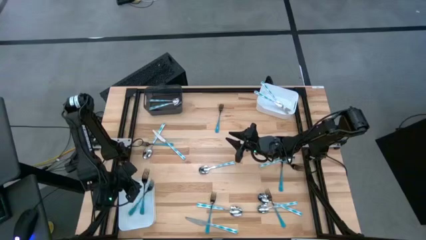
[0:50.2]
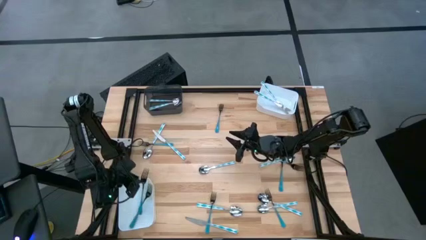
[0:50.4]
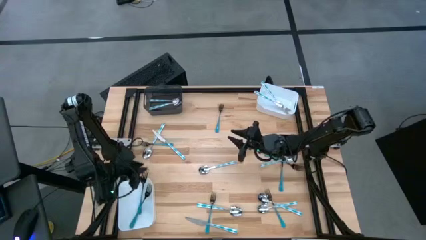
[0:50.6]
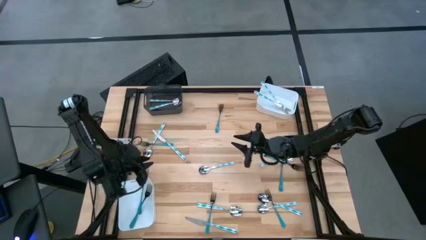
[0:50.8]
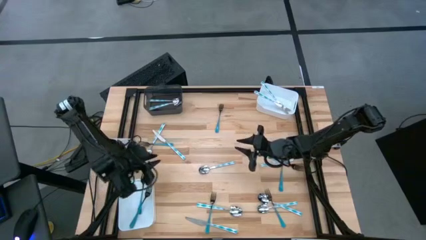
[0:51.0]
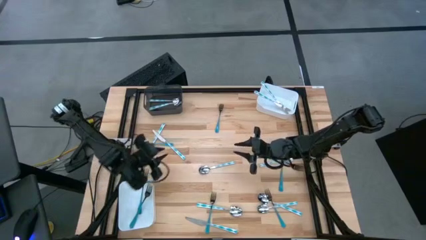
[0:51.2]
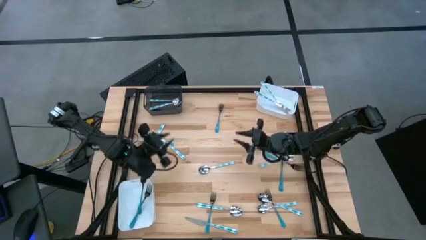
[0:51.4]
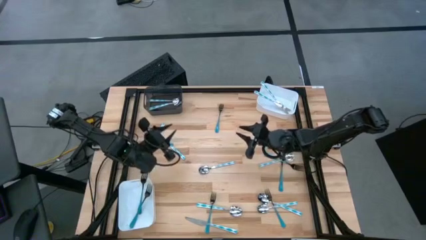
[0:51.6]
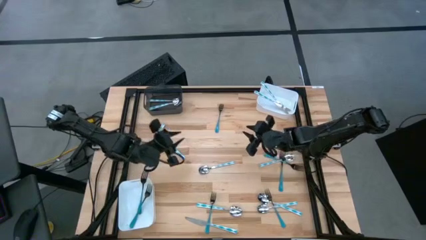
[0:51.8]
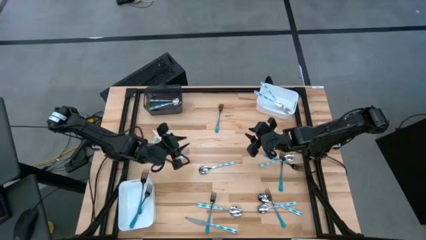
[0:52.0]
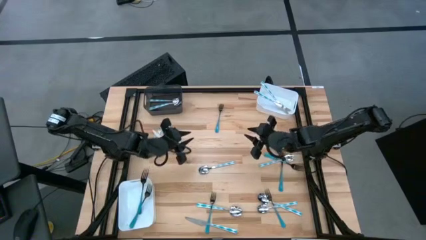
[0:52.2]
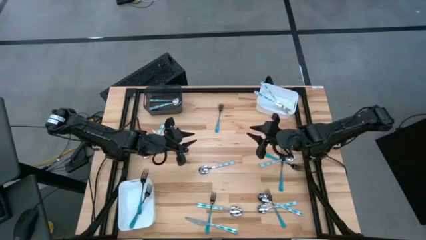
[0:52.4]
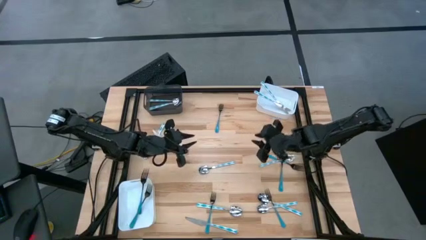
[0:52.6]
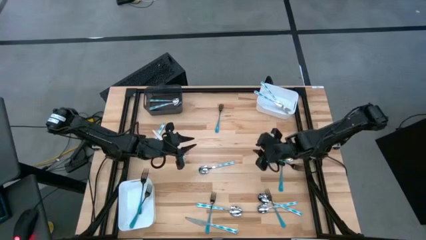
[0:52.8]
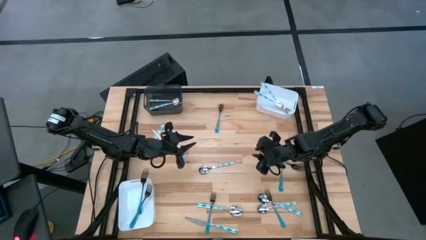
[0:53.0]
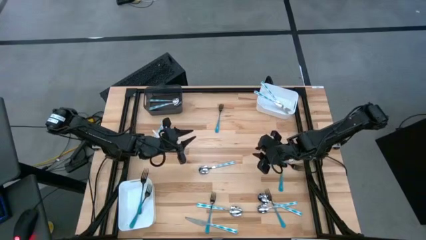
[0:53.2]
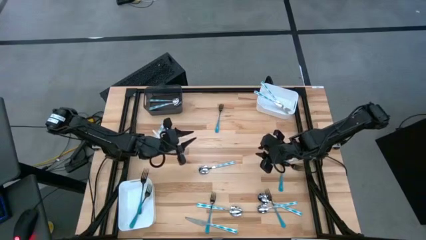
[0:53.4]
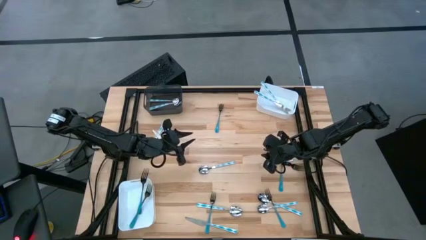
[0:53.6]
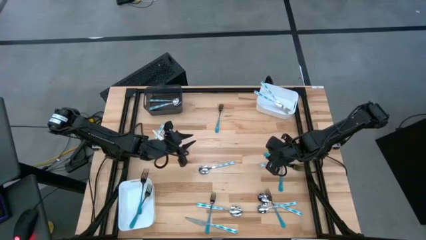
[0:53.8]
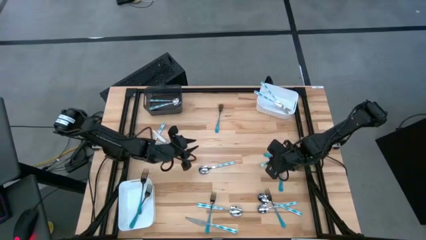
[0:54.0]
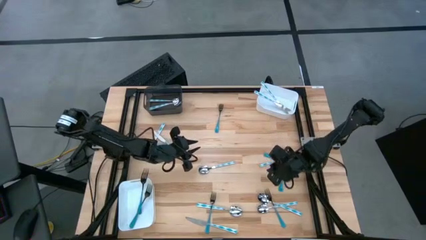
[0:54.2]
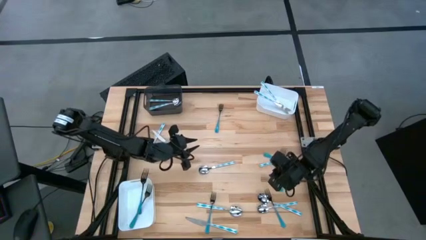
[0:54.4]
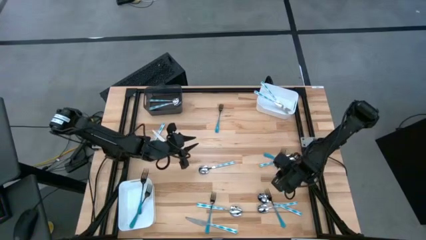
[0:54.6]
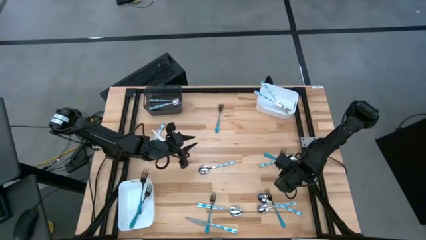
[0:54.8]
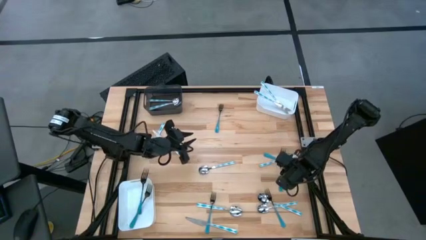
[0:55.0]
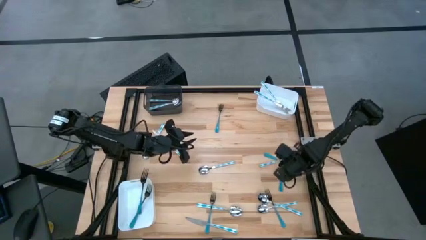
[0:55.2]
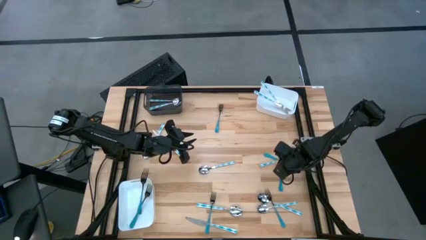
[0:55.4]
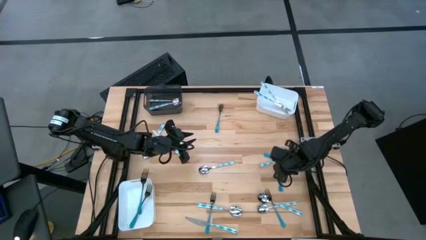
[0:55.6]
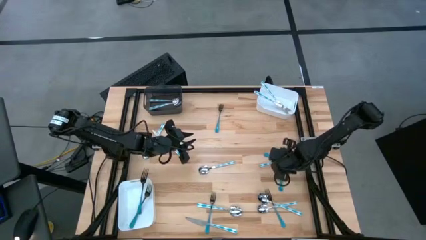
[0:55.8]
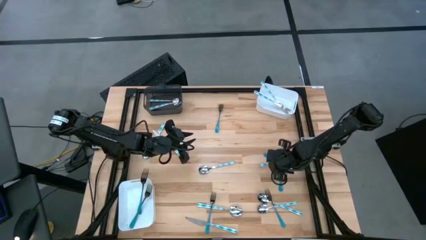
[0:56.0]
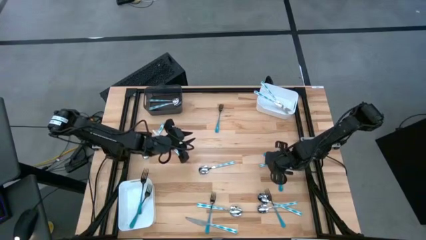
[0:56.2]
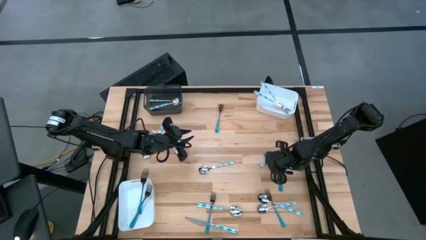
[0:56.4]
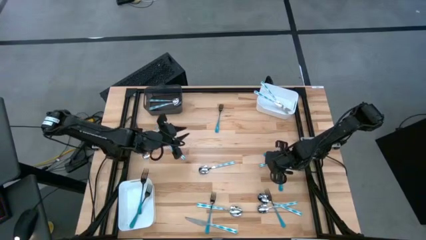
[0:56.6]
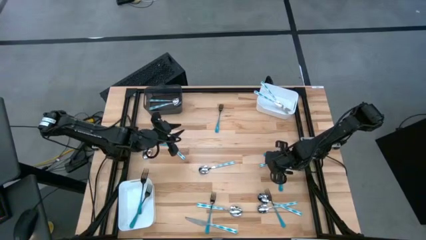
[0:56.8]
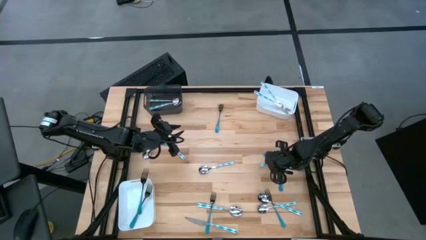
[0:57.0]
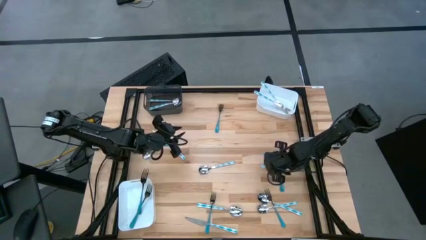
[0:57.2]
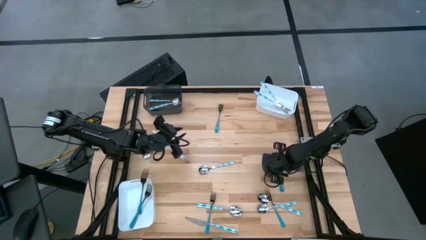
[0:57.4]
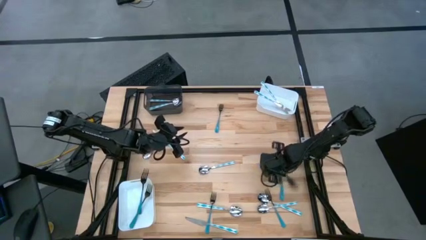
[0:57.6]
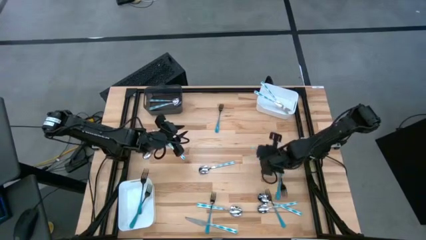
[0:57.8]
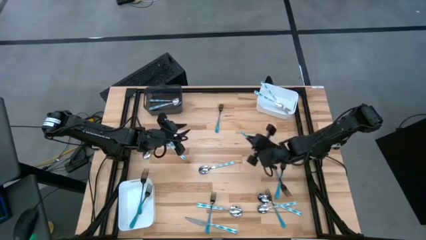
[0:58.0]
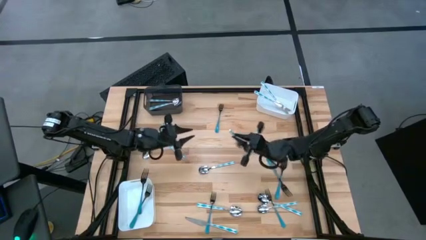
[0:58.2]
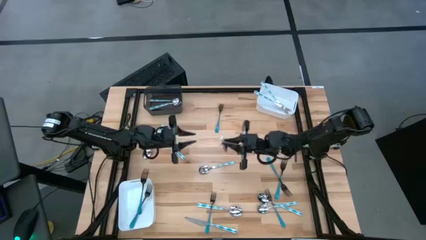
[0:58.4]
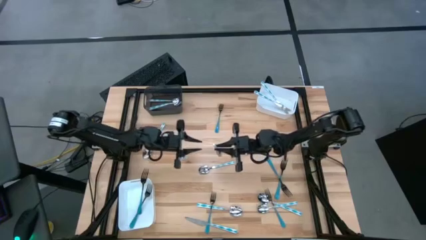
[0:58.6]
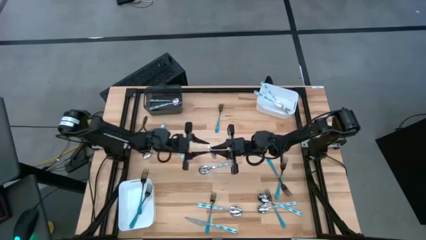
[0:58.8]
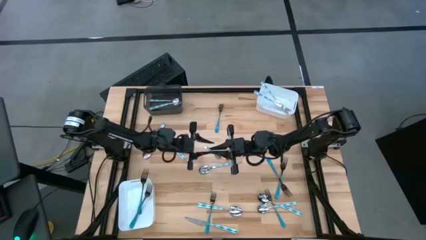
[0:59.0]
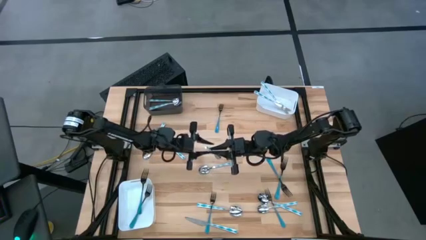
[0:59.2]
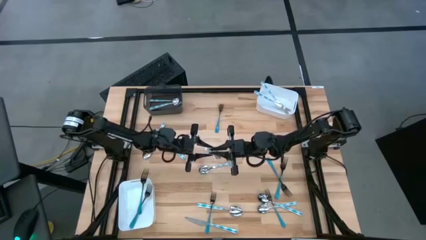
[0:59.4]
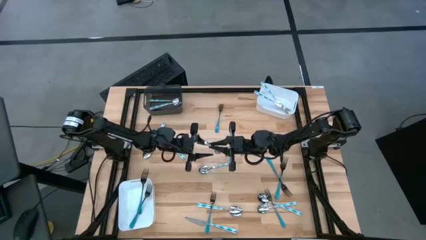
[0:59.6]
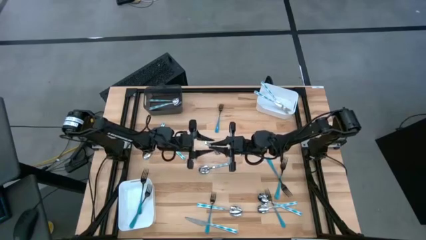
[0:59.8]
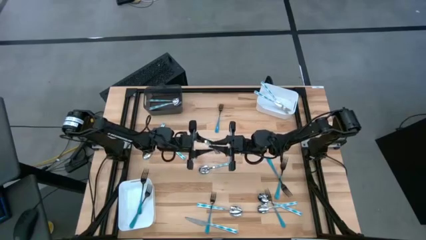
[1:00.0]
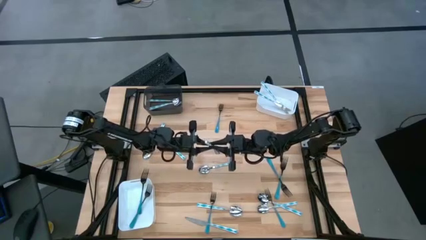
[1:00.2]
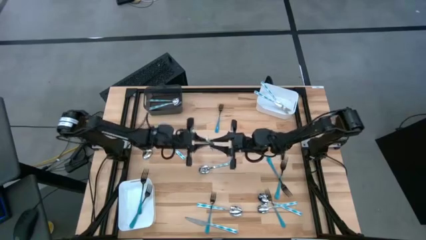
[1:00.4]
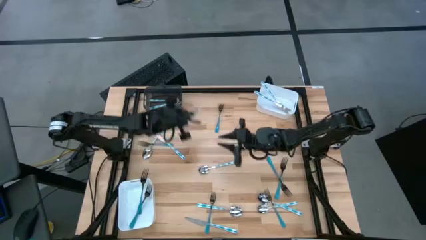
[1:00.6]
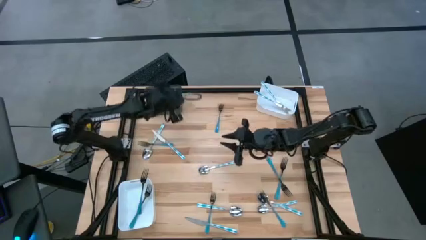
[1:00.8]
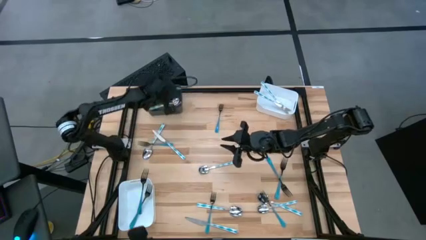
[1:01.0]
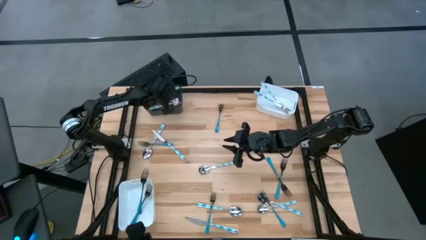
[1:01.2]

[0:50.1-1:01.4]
Task: Sort silverware by color (type)
Put the blue patterned spoon into the black bin

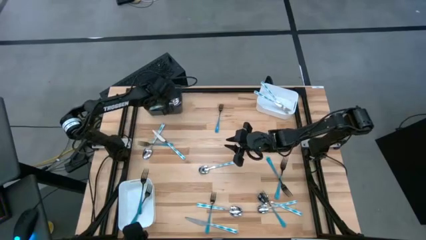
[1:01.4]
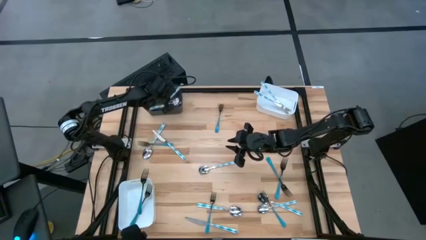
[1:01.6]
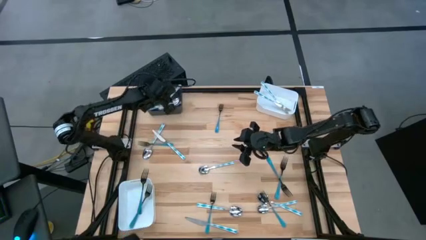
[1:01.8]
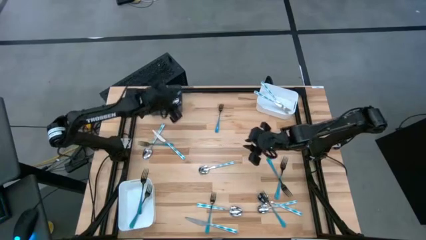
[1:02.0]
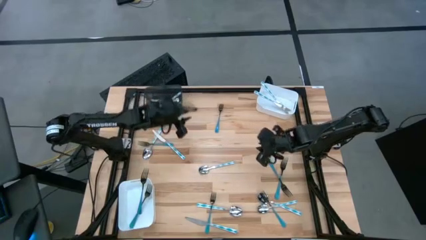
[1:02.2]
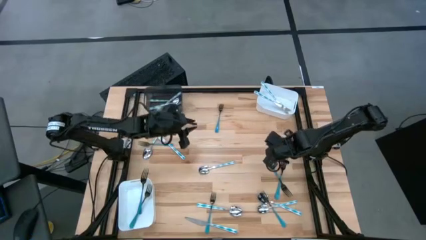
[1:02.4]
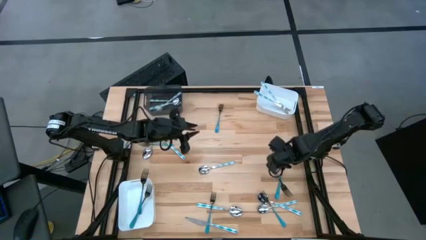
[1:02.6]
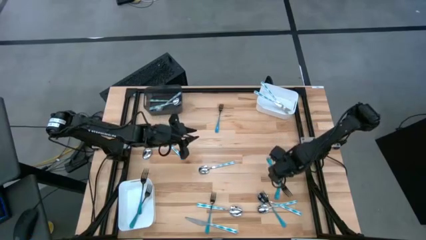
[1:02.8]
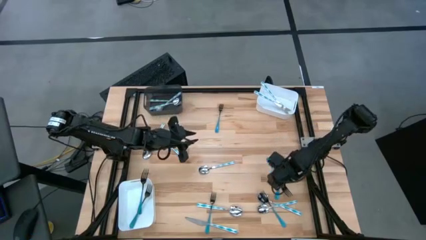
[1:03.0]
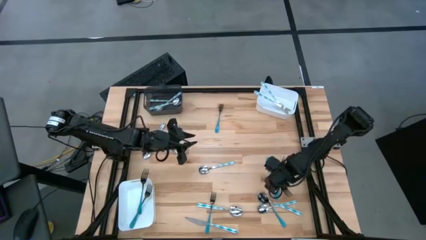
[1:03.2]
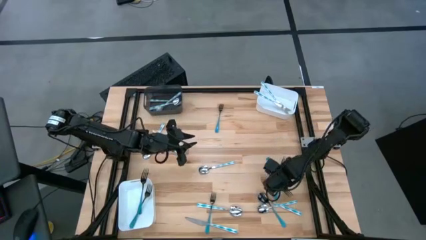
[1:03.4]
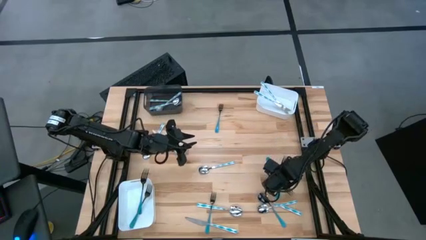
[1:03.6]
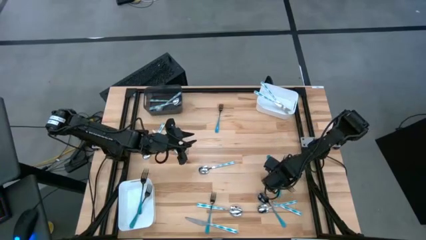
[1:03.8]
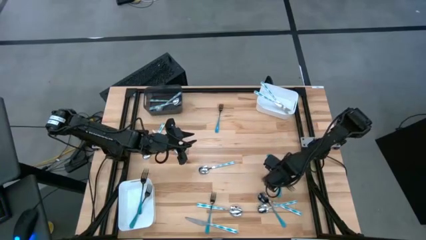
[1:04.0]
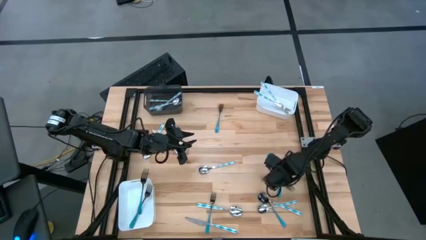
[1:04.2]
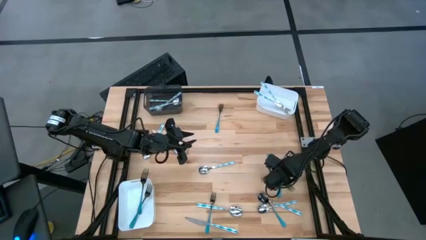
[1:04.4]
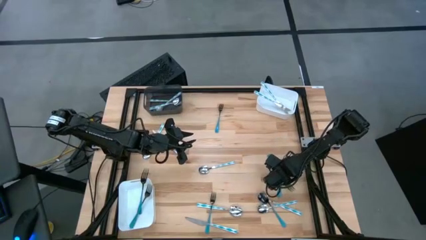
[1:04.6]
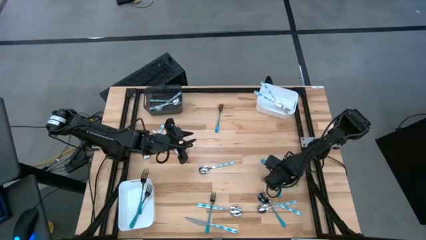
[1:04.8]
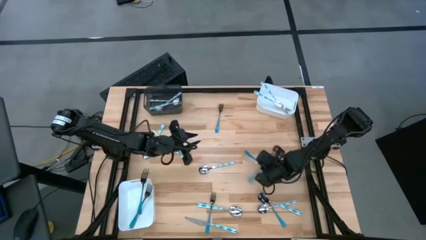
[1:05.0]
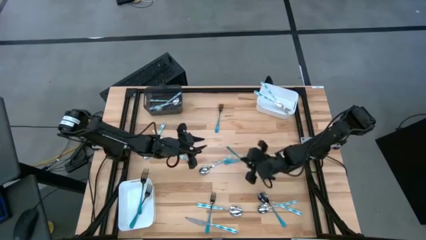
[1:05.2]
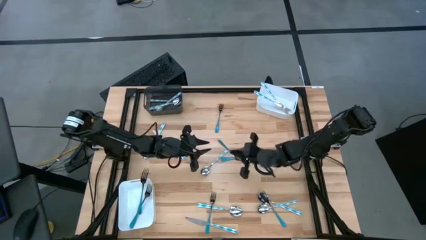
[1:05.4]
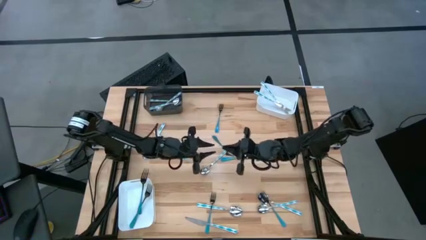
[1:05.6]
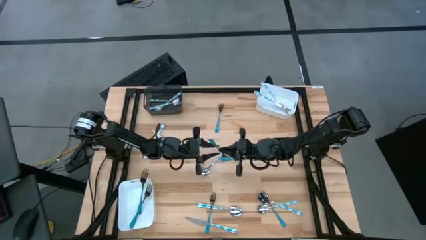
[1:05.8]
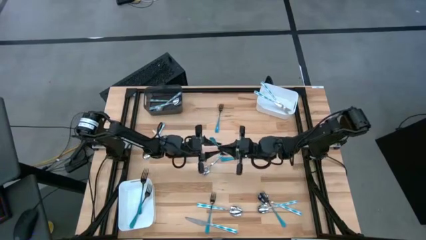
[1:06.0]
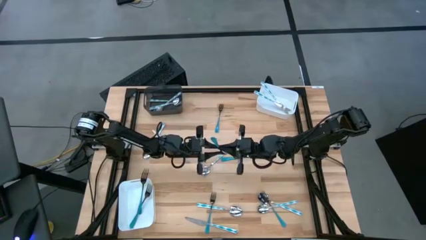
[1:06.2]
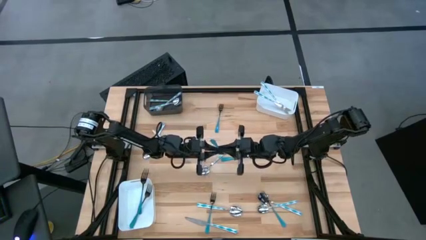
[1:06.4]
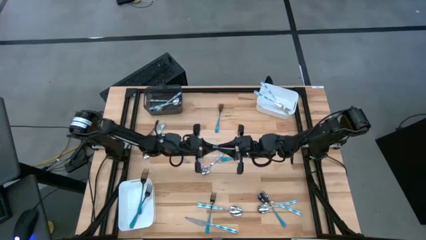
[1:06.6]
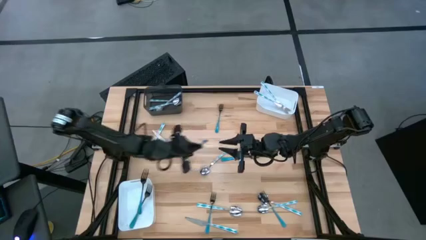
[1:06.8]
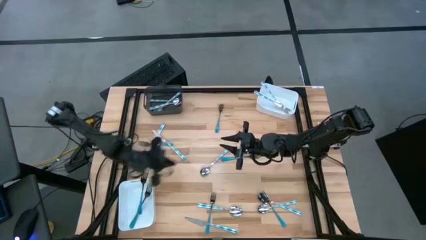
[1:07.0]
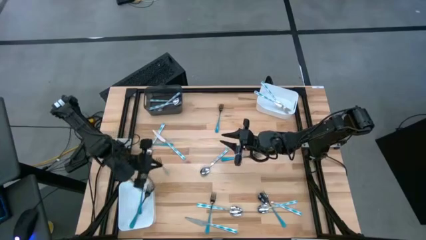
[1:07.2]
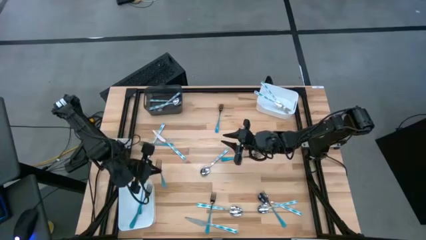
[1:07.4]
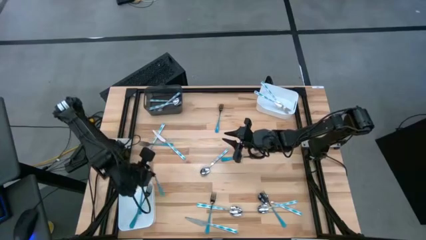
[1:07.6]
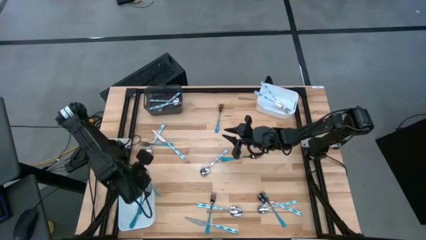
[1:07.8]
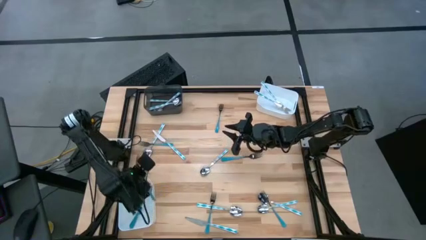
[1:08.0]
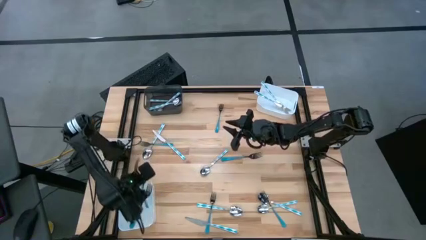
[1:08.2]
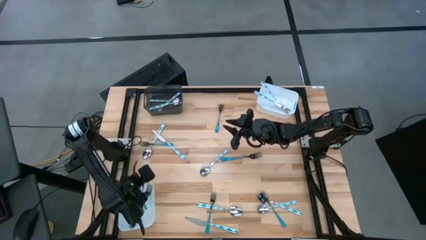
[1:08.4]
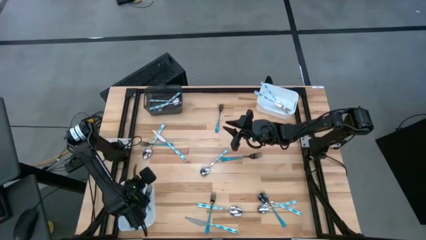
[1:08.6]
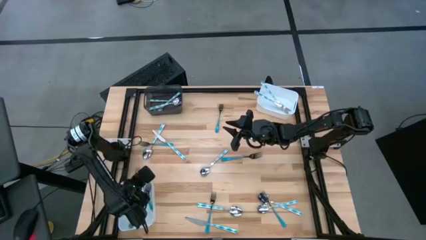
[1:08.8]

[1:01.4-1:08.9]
Put the blue fork into the bottom white bin
